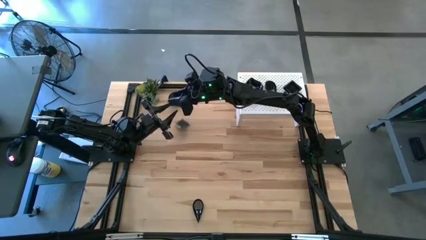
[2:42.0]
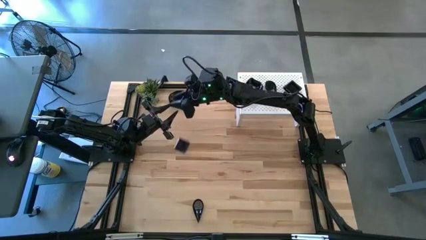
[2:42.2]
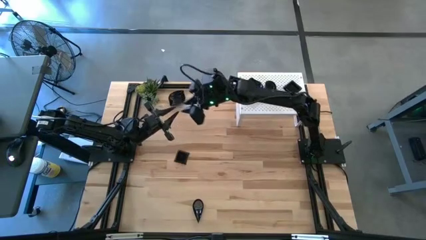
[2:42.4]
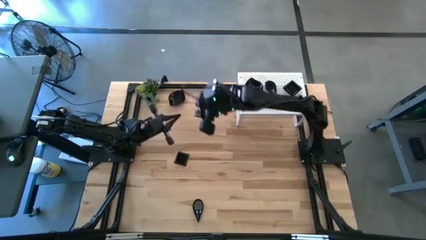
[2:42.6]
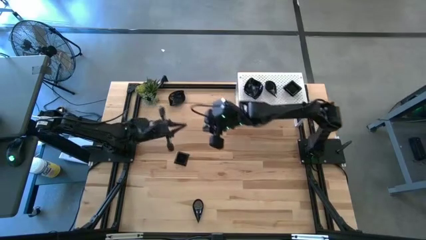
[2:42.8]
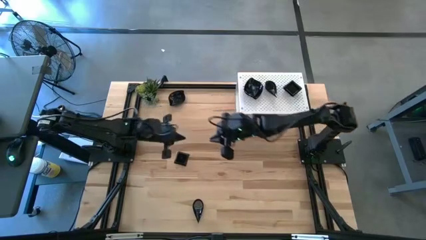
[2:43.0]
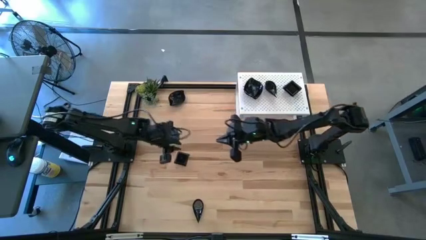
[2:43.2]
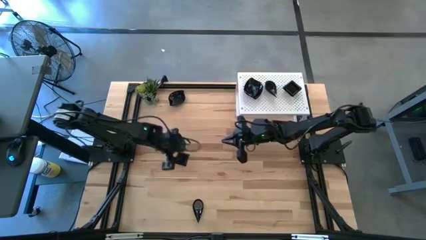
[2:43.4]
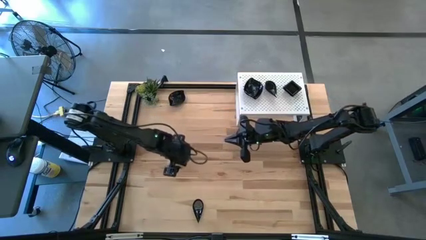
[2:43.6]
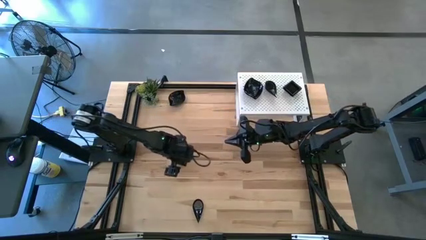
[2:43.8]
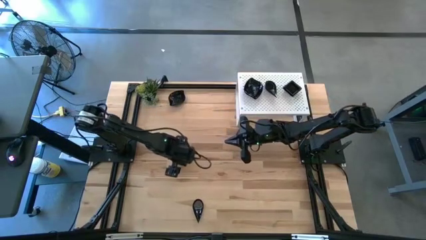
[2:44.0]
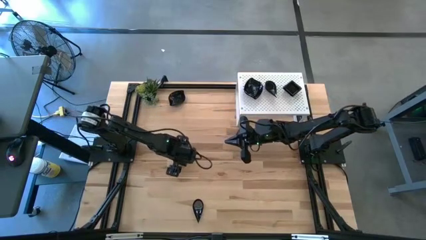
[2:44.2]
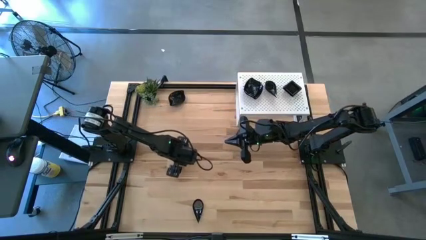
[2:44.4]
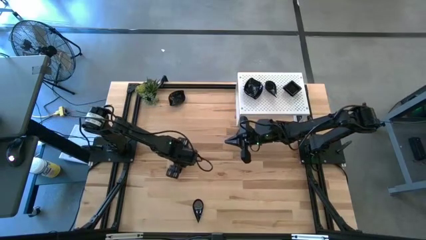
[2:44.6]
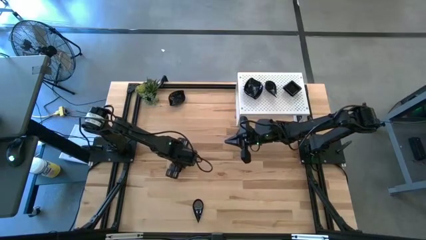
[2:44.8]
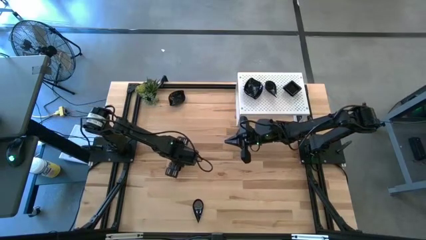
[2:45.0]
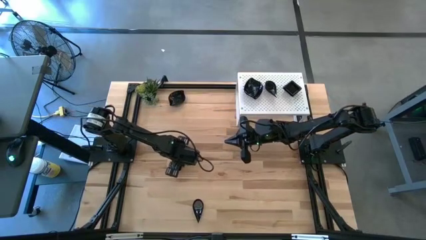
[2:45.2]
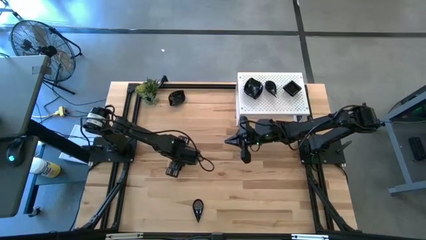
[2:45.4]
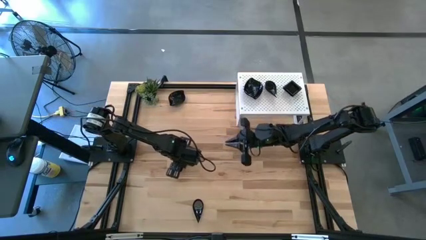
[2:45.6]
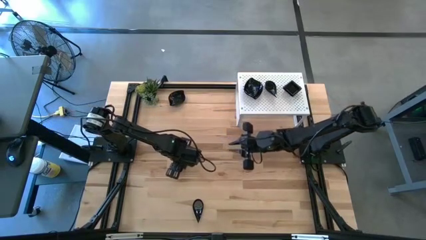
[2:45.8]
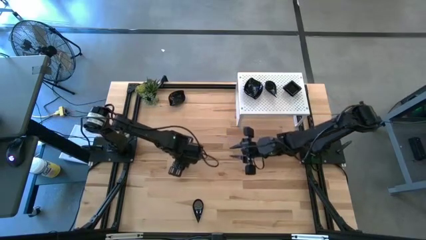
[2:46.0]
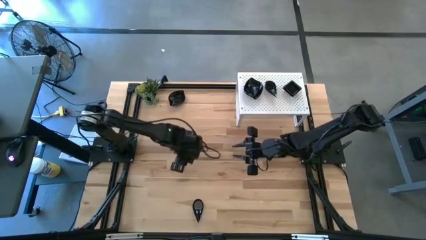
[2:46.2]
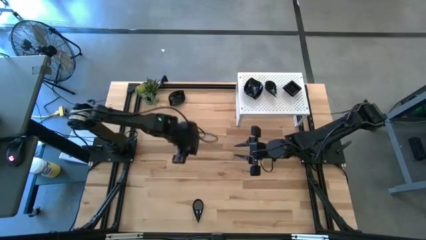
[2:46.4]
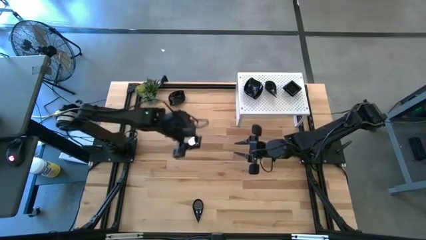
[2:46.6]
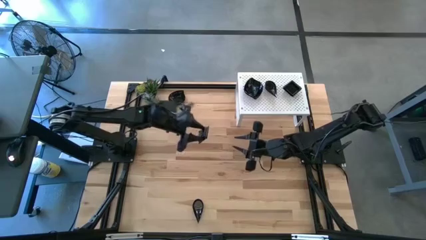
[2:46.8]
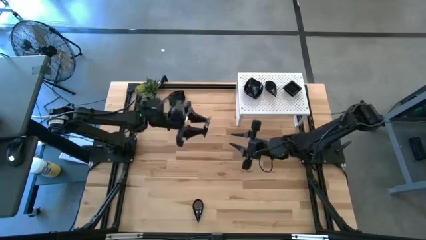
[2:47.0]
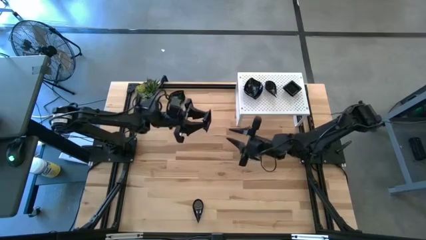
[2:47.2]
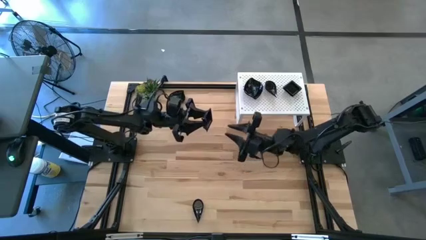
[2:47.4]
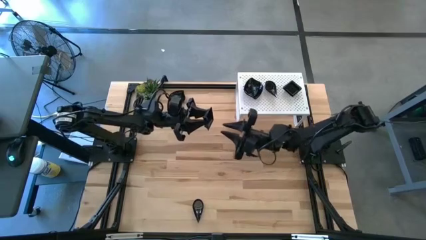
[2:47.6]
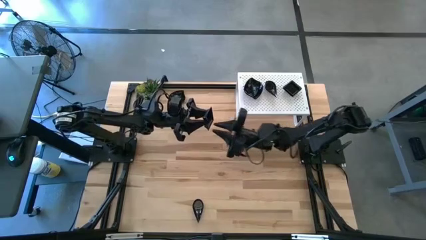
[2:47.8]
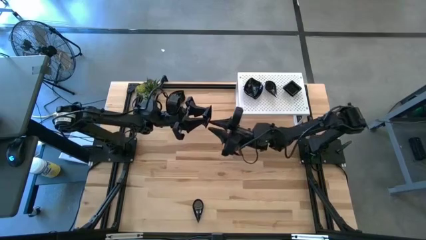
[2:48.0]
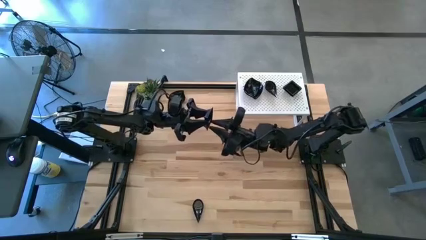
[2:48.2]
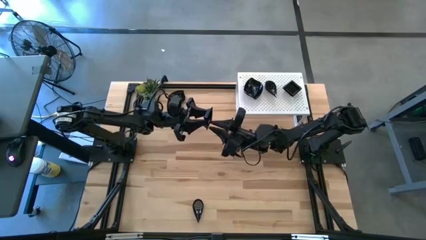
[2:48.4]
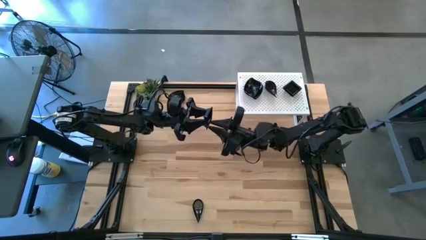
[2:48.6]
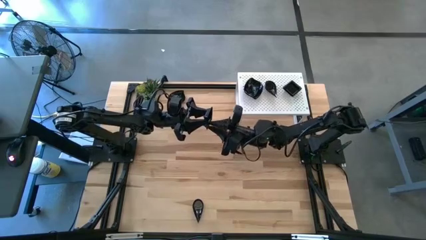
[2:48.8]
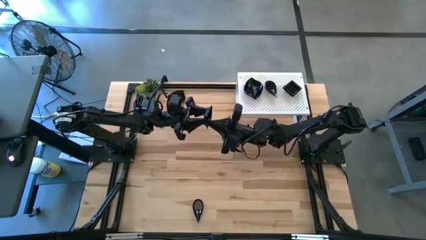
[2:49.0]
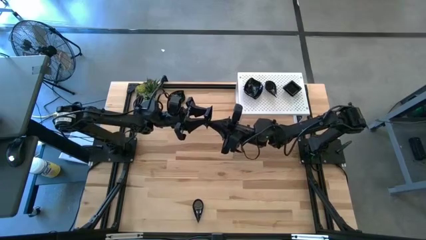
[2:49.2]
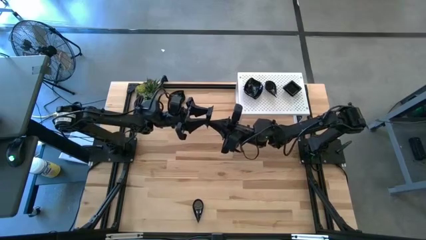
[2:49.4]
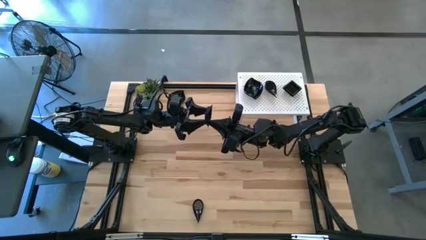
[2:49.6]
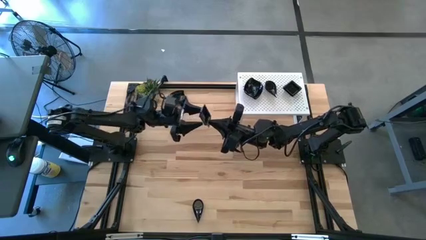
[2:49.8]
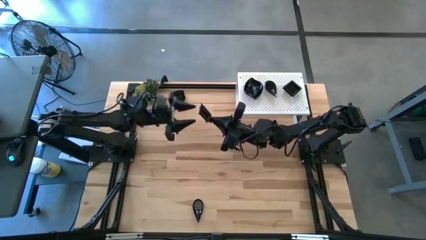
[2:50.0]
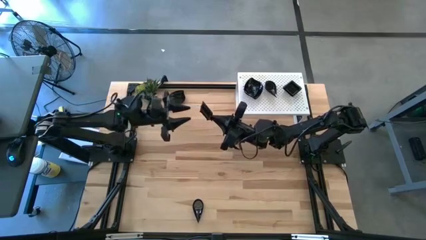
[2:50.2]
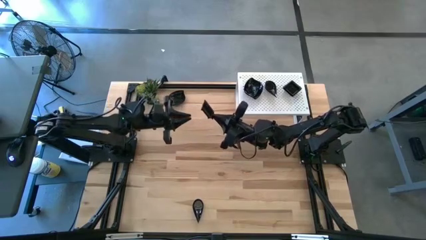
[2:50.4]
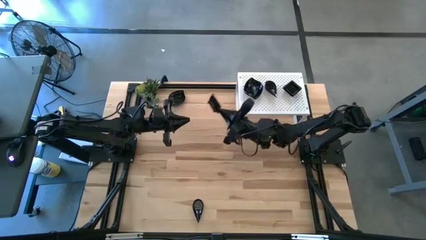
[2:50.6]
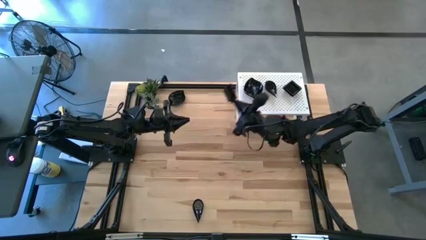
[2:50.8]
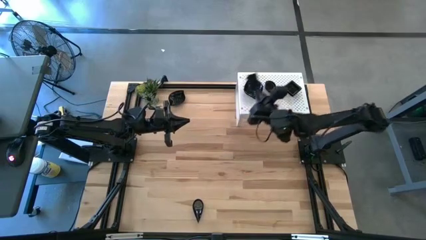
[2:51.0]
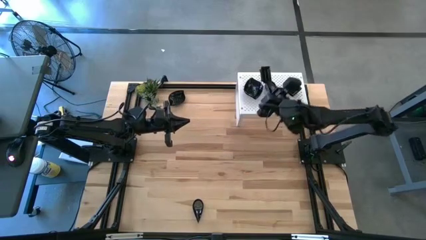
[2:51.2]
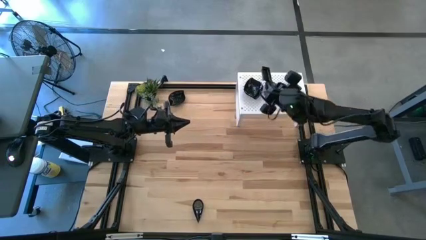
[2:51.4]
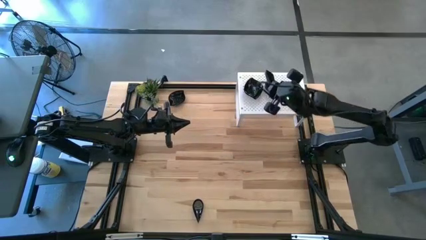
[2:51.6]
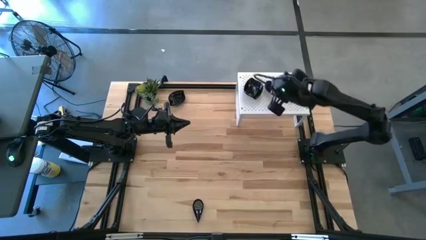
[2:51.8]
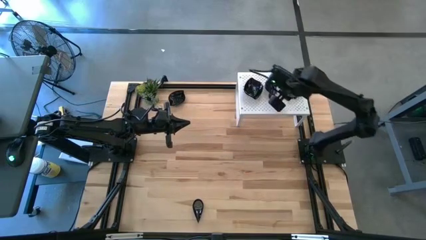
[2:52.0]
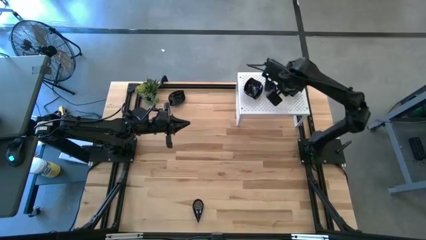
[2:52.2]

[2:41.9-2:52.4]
Task: Pick & Place Mini shaped plates
Stack the black square plate on top of the black square plates on the shelf

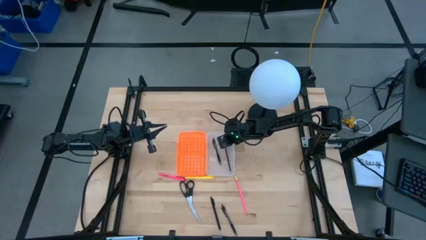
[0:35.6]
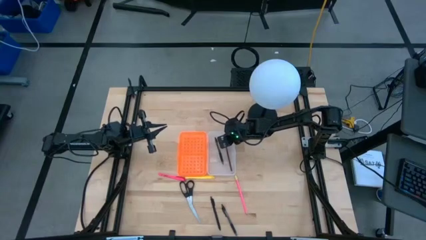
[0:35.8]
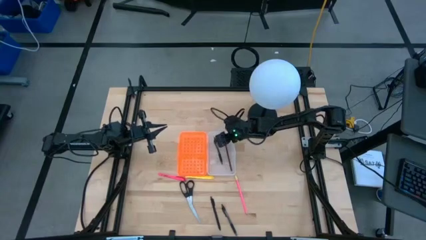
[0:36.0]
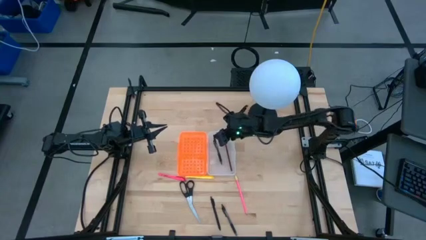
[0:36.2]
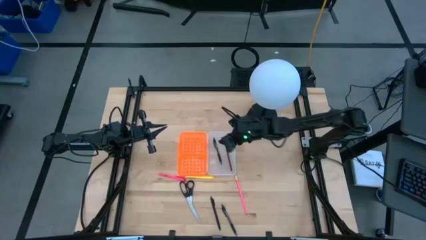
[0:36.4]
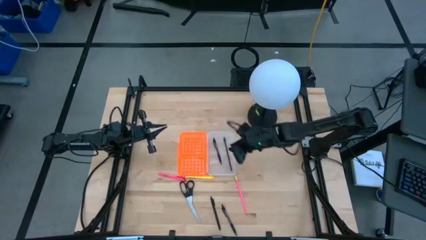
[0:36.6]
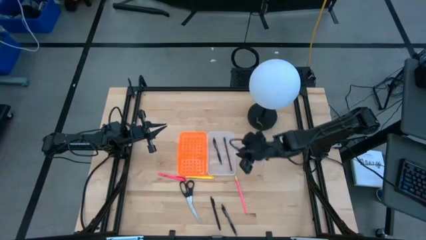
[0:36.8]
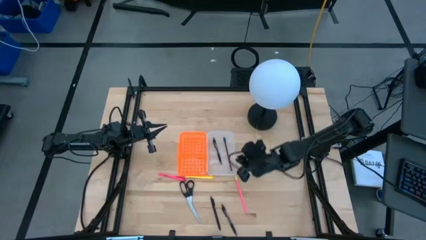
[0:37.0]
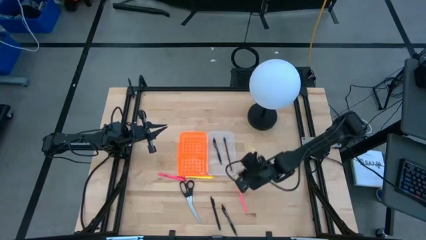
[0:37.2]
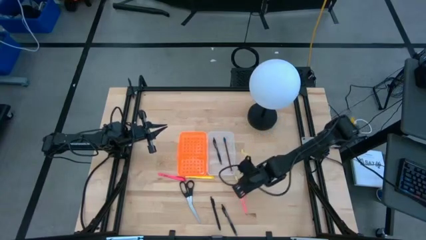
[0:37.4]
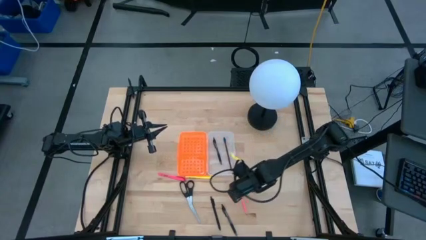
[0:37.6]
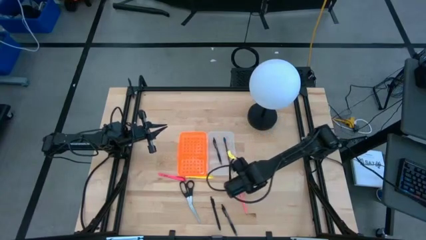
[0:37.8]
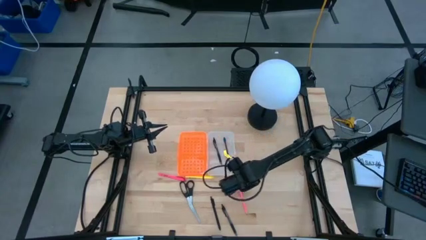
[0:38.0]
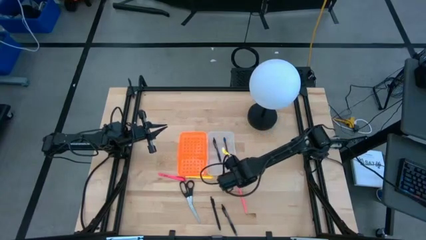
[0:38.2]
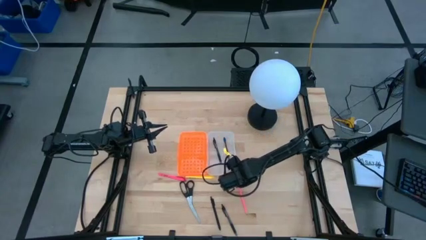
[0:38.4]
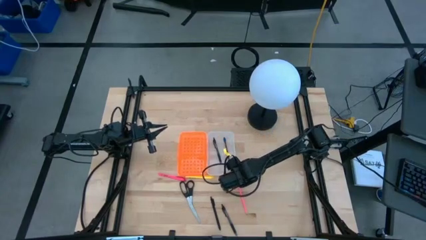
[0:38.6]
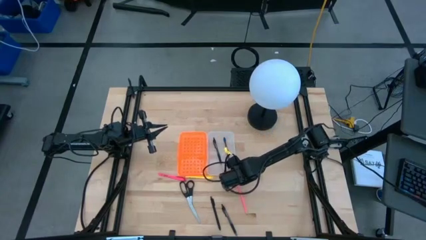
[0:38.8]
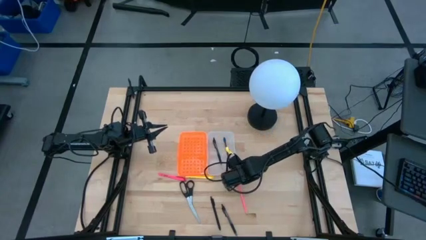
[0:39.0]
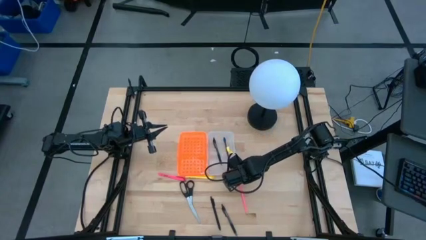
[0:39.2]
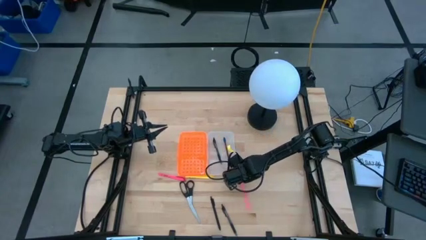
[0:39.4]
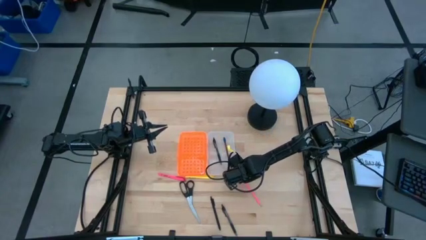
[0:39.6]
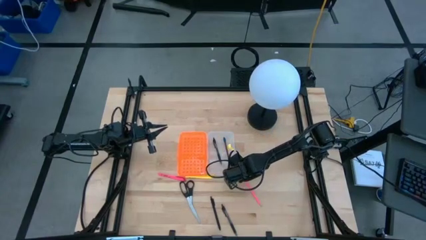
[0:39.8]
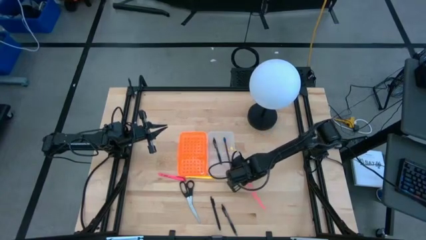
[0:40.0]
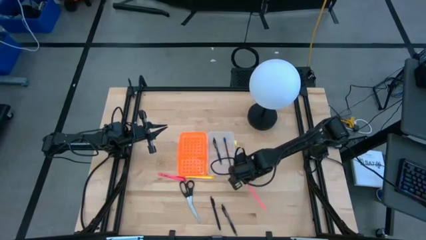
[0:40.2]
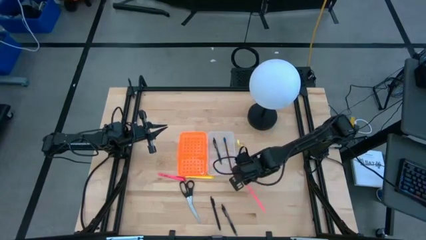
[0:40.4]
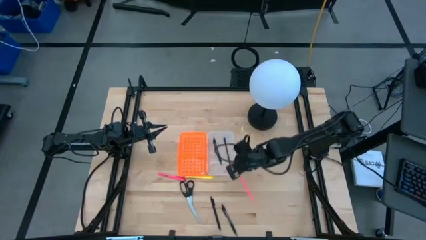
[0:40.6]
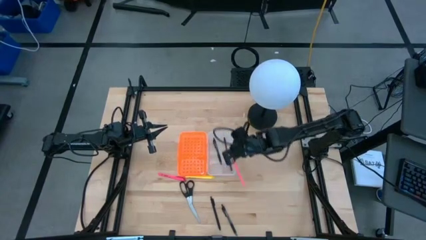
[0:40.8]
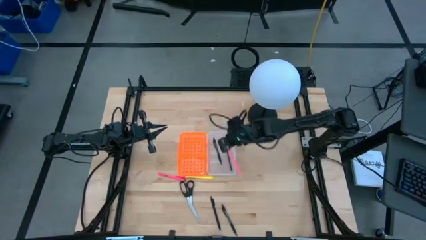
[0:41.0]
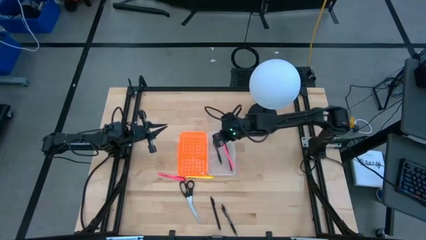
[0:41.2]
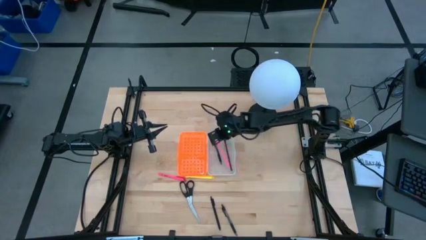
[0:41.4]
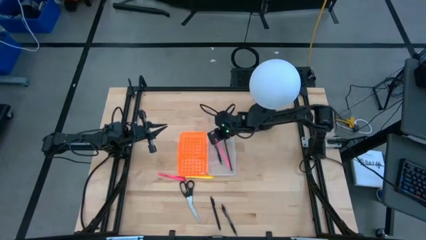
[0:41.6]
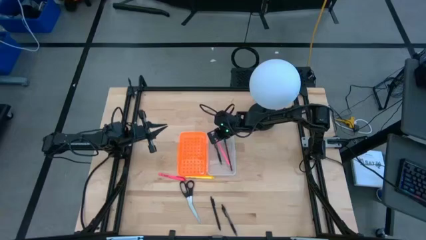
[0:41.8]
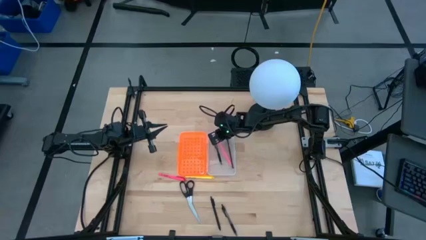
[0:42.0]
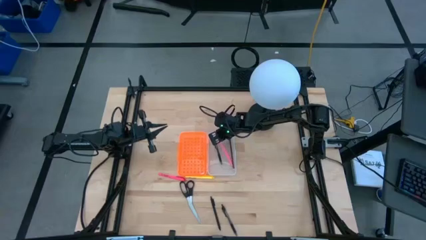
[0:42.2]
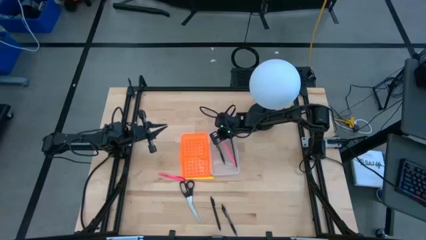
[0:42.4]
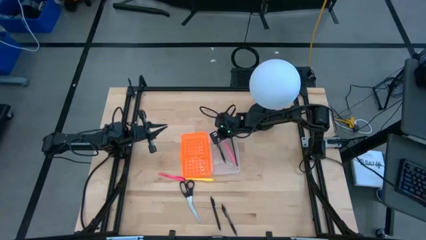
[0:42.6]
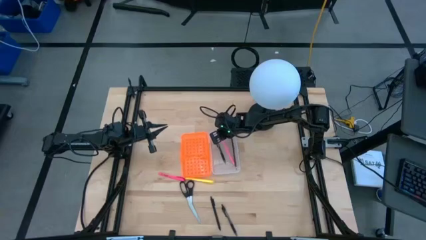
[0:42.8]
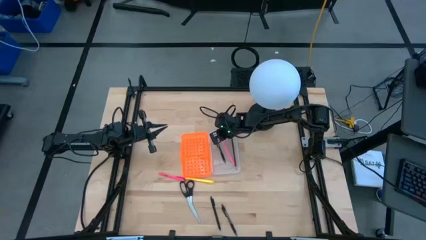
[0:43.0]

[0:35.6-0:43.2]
Task: Pick & place school supplies into a supply box
Put the pink pencil into the supply box
